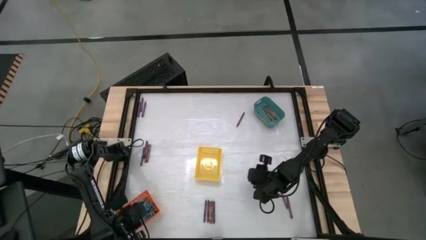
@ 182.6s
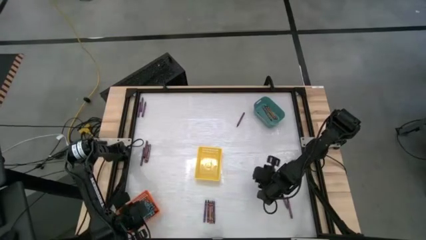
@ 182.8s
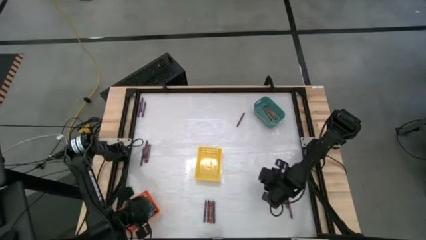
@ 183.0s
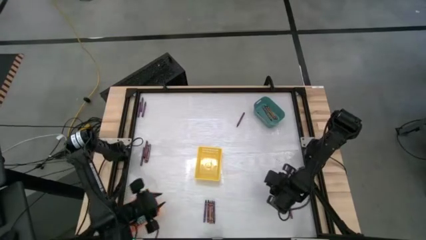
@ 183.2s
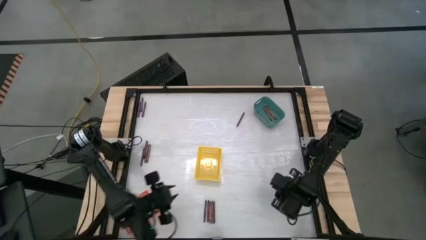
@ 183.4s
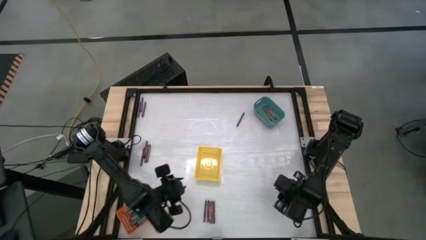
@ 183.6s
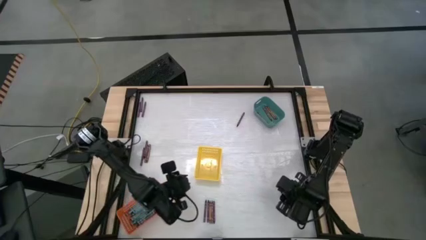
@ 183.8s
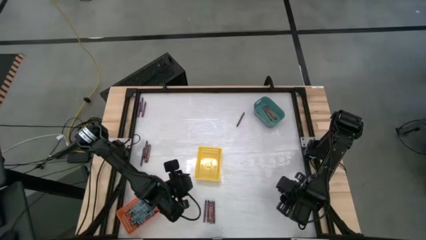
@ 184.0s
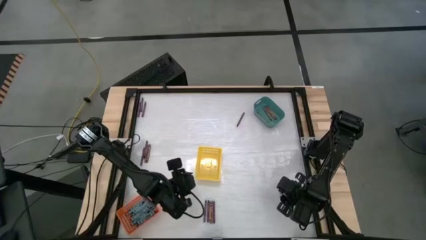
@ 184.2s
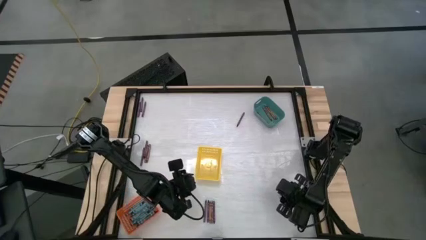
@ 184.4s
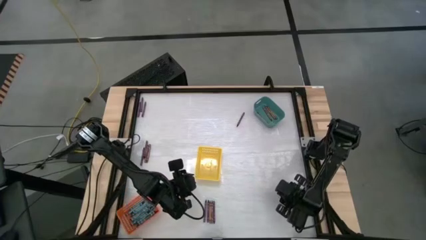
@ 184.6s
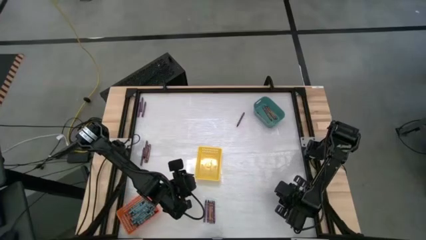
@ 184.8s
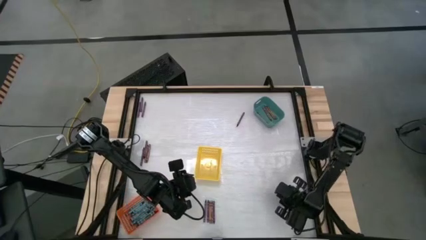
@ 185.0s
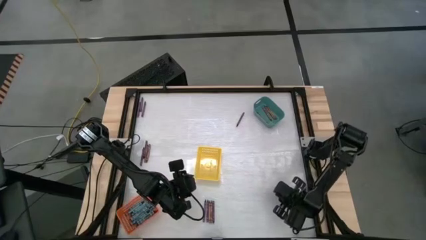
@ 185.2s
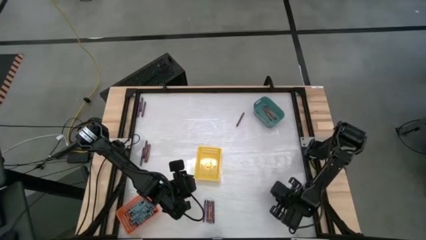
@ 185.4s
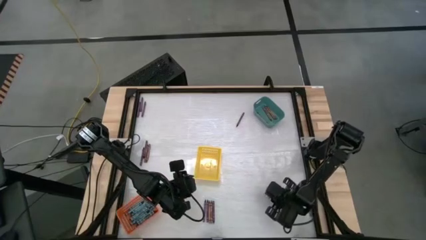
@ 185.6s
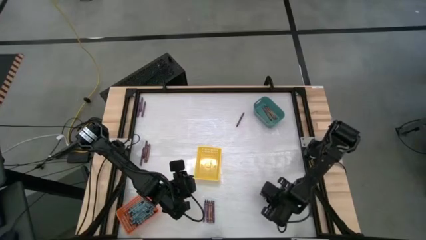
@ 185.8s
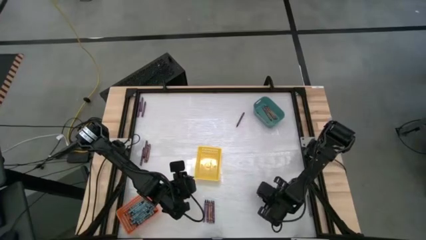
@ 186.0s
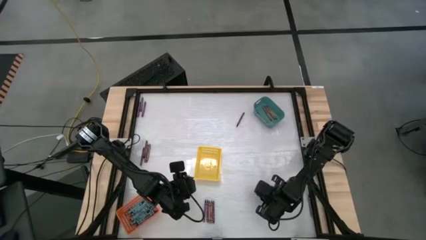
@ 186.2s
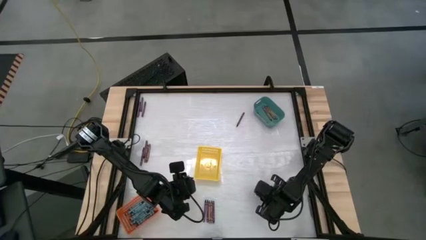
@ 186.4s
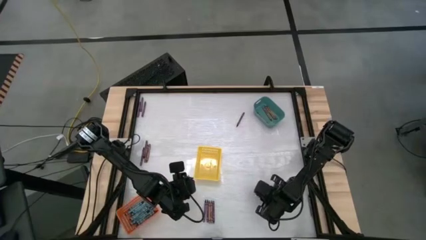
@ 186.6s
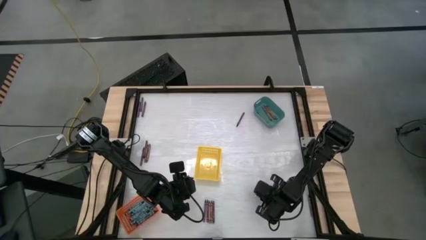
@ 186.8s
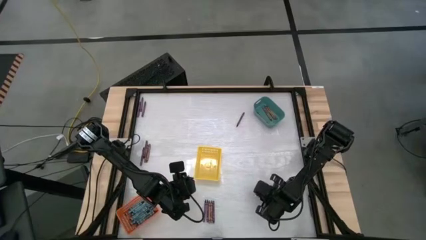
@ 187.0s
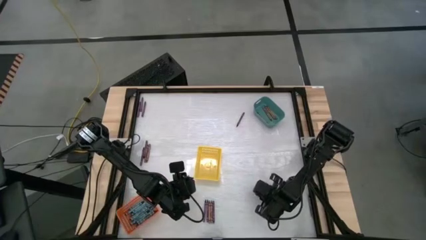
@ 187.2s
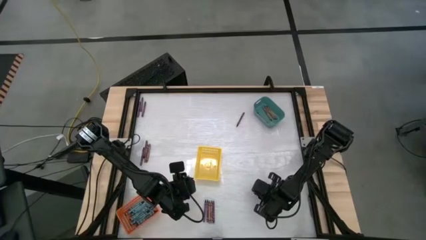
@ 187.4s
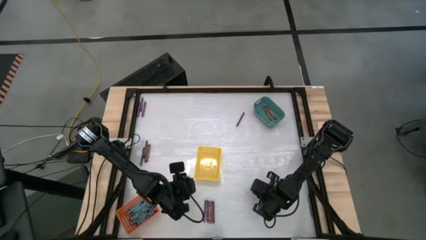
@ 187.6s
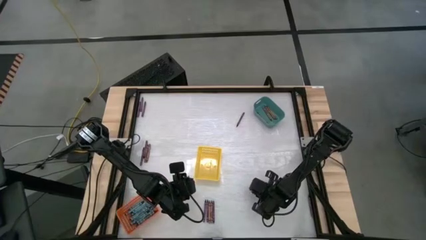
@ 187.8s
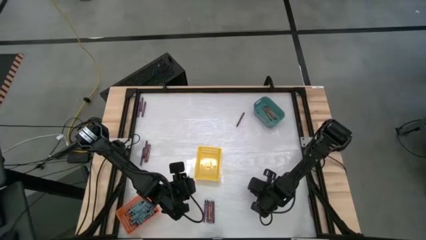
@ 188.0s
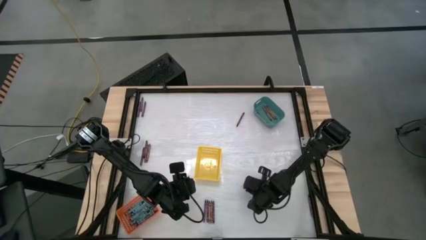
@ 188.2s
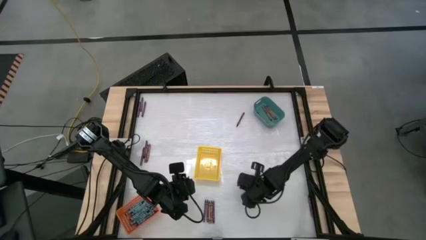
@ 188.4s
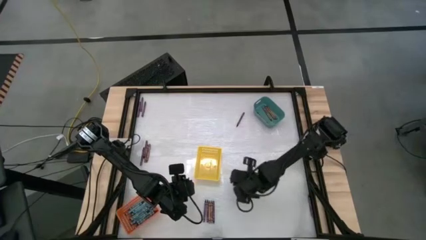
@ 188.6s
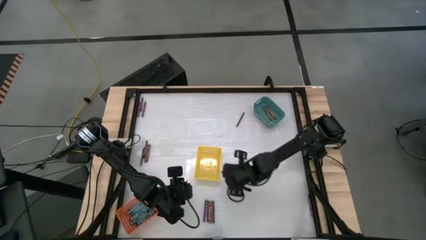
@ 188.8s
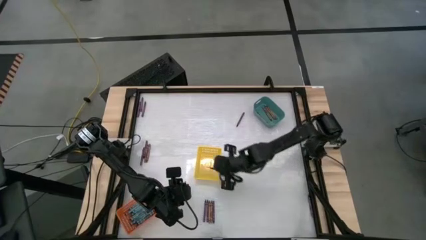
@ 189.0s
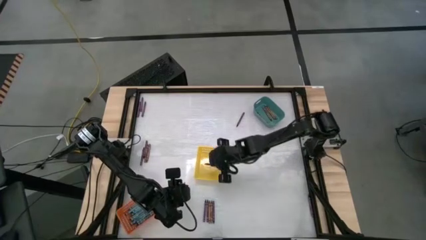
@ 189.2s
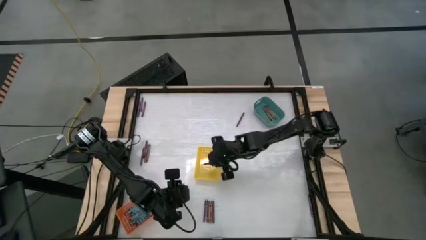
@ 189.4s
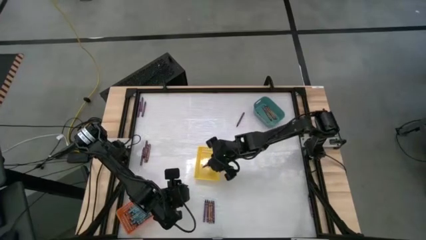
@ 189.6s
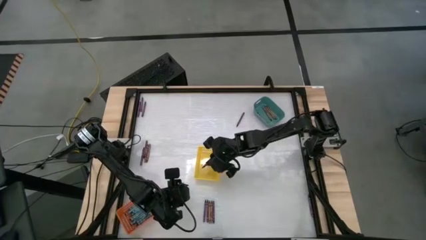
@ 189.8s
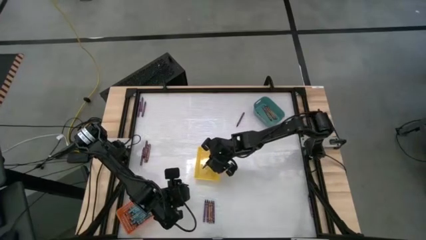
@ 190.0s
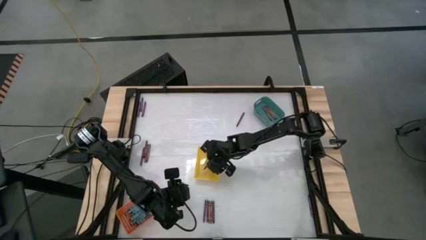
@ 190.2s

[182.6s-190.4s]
Task: Sort crayons
Put the violet crayon into the yellow basket

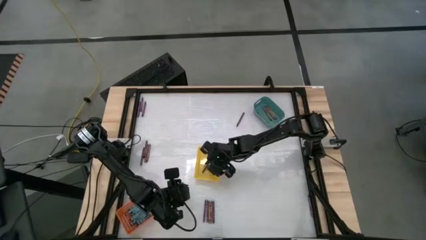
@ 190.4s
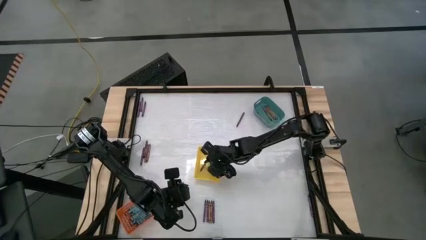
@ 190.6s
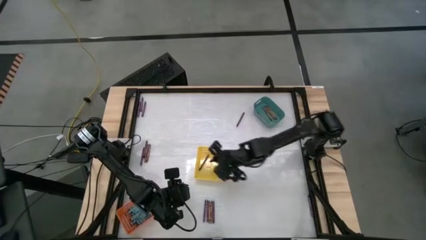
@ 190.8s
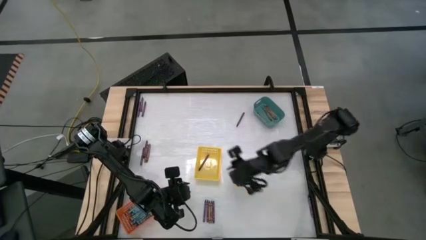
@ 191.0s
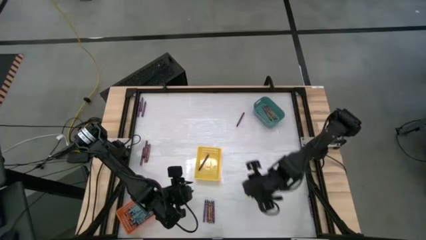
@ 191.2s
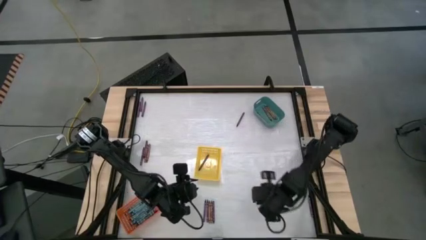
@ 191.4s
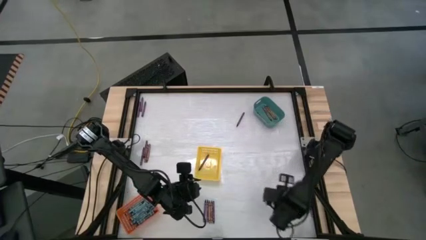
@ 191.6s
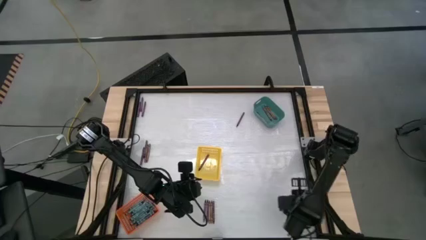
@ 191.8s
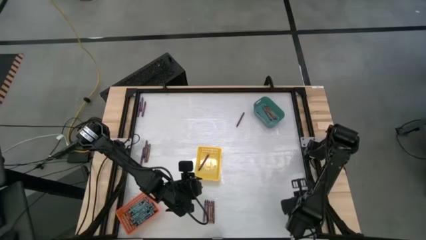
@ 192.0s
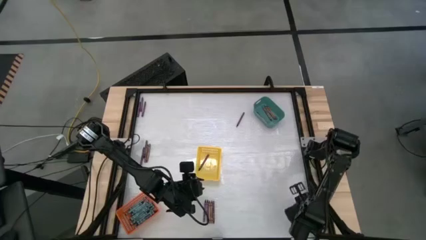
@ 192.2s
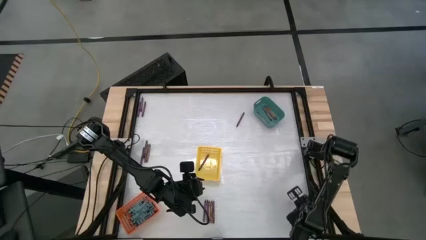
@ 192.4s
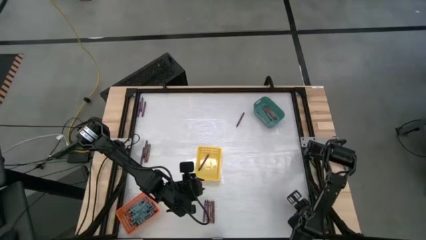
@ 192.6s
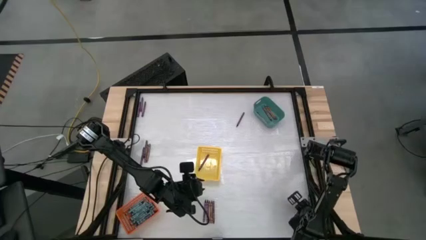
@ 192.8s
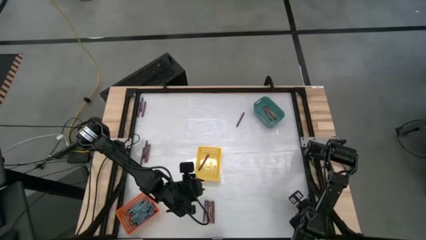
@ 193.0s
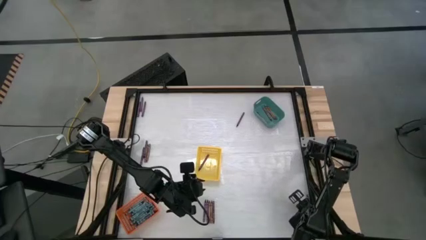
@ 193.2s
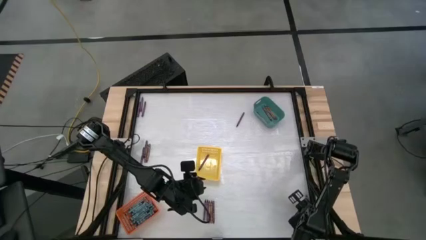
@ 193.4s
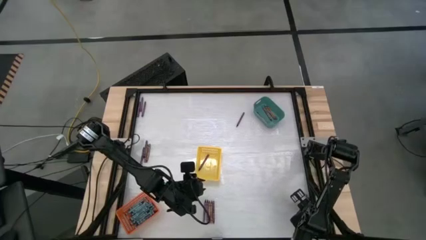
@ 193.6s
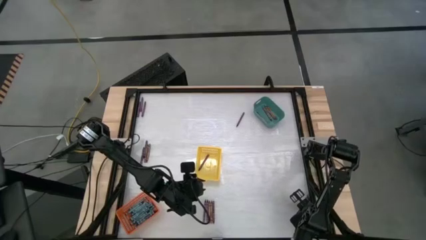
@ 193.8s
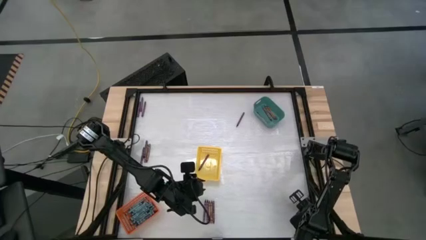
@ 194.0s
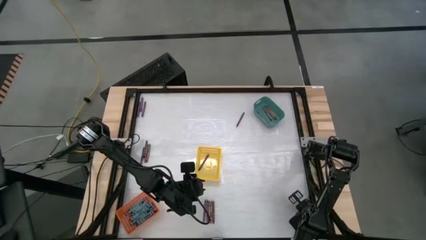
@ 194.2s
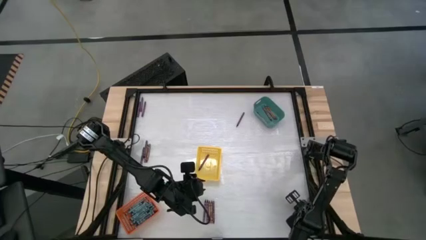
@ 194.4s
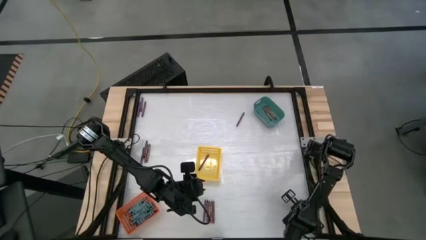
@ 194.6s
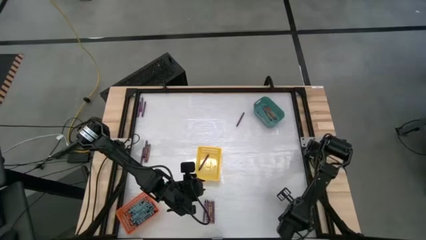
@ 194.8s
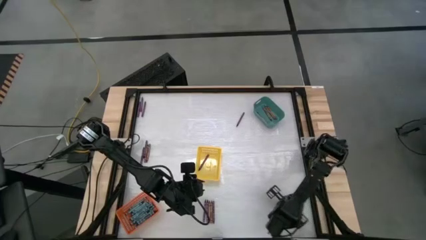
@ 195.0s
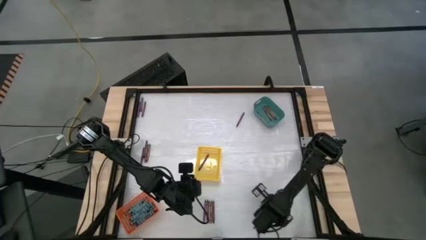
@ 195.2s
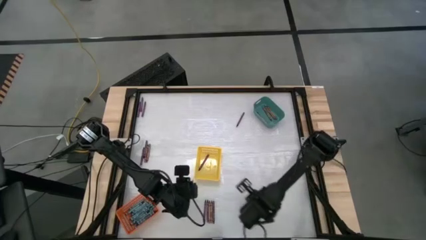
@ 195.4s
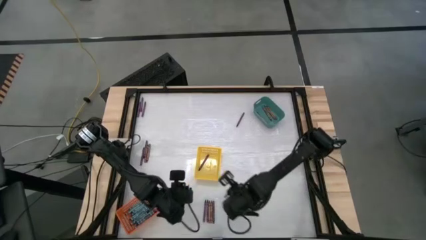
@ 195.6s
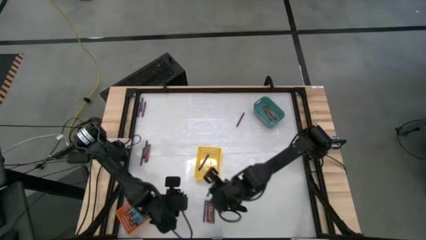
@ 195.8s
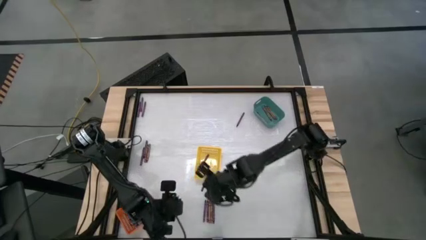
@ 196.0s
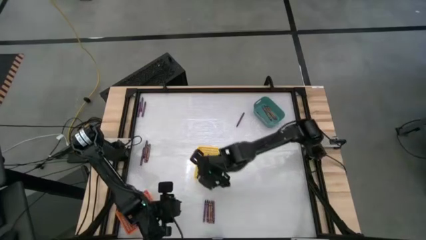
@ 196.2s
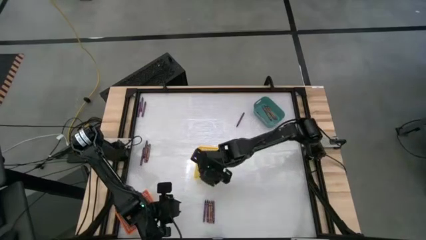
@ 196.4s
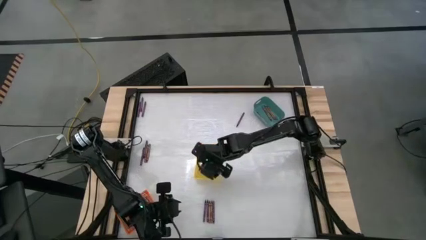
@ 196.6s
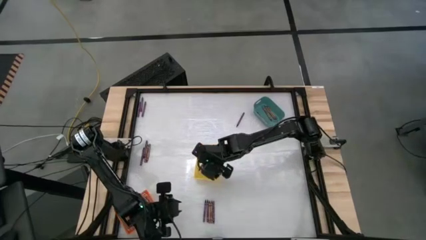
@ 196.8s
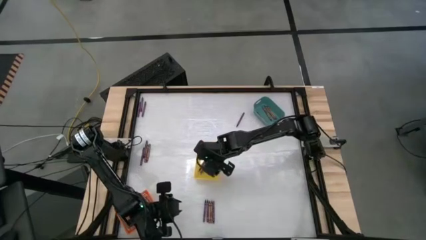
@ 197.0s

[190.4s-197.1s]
Put the violet crayon into the yellow basket

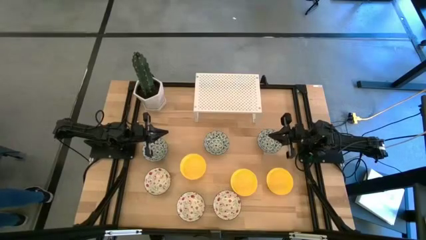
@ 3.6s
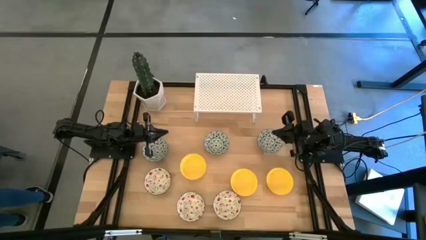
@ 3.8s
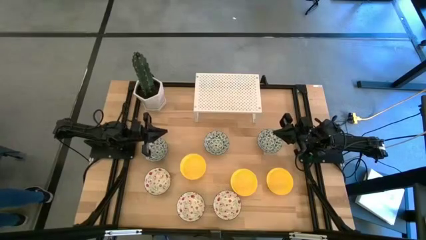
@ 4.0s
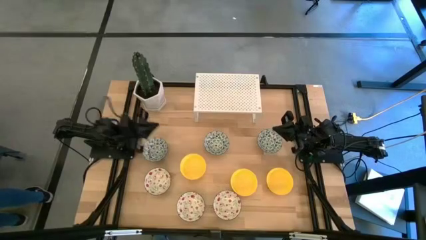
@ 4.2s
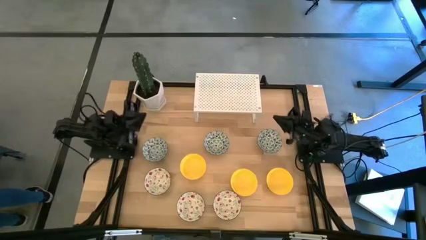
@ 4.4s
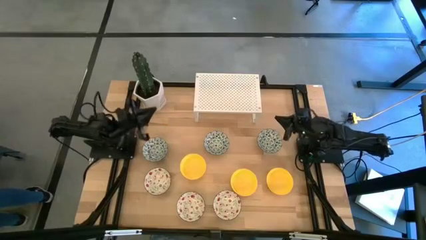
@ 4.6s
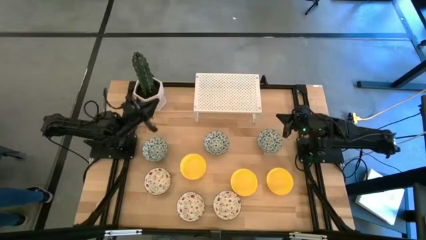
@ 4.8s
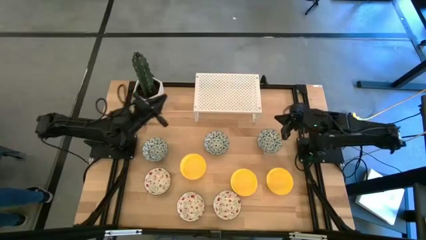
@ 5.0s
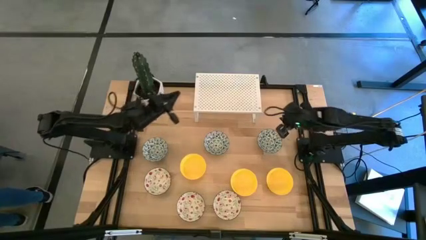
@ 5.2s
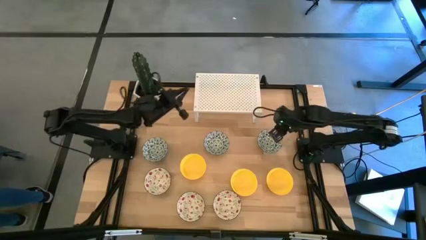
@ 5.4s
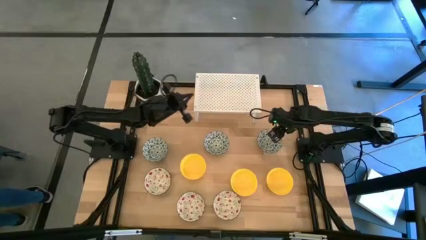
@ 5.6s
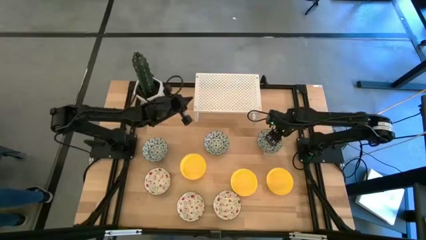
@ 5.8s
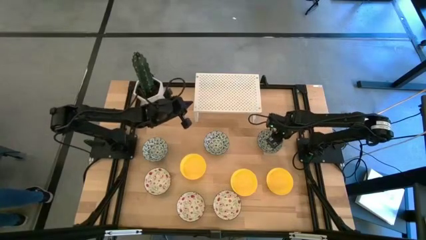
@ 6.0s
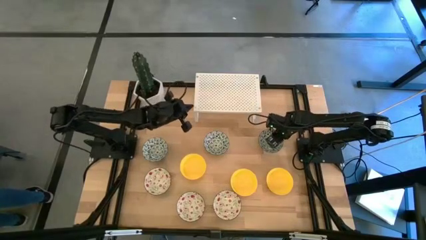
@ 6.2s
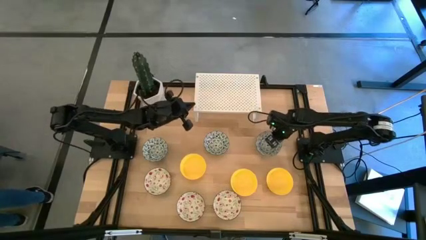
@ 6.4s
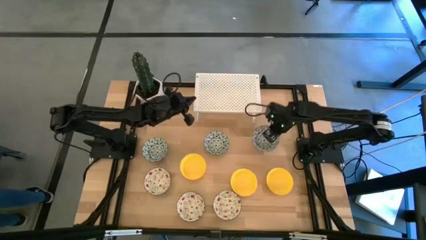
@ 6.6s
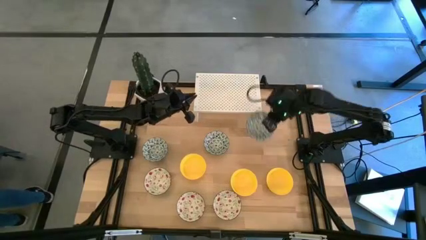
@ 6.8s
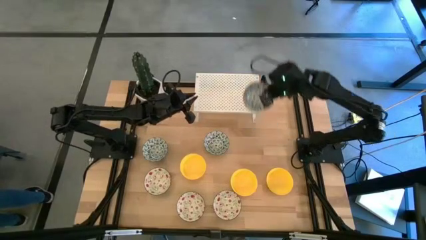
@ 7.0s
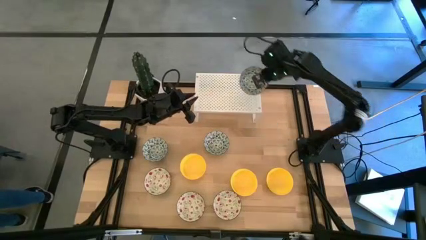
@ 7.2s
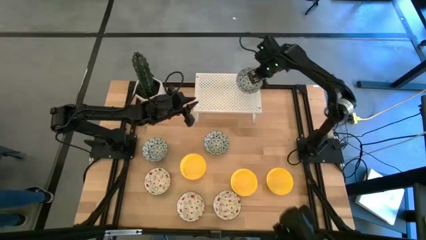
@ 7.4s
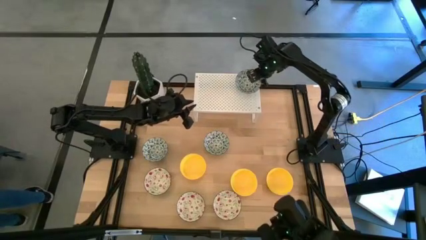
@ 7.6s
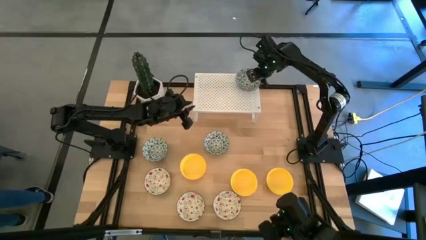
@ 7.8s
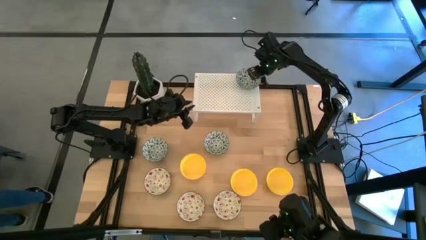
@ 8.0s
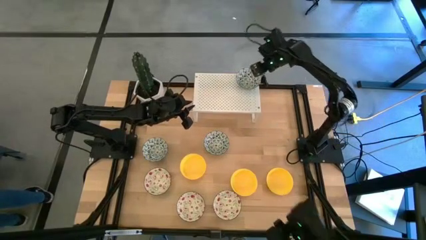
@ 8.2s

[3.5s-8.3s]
Task: Pick & Place Mini bowls
Put the right blue patterned bowl on the shelf
